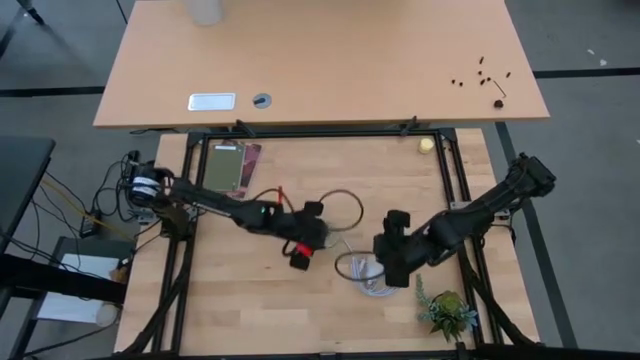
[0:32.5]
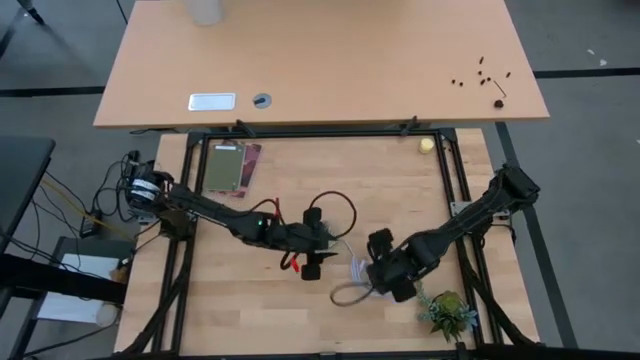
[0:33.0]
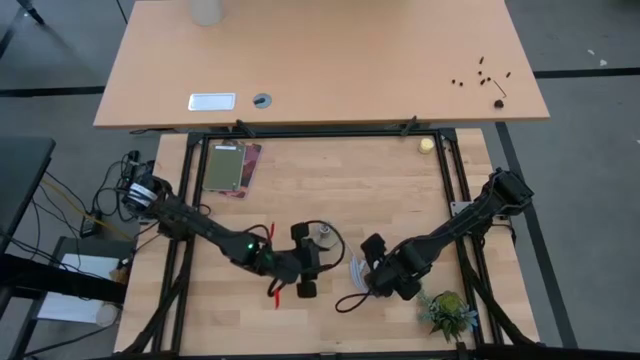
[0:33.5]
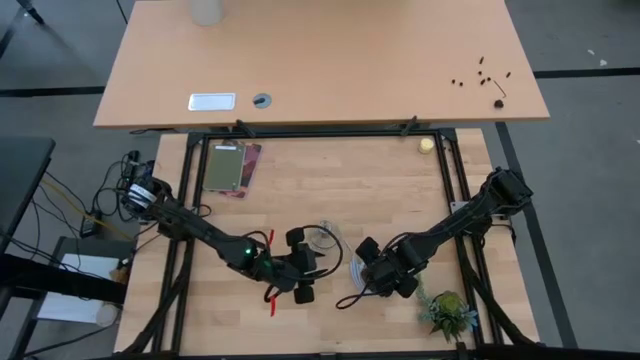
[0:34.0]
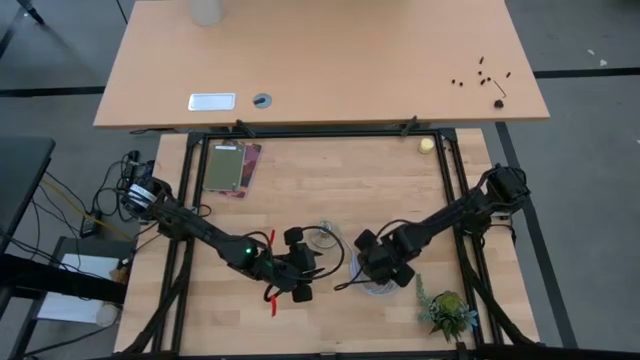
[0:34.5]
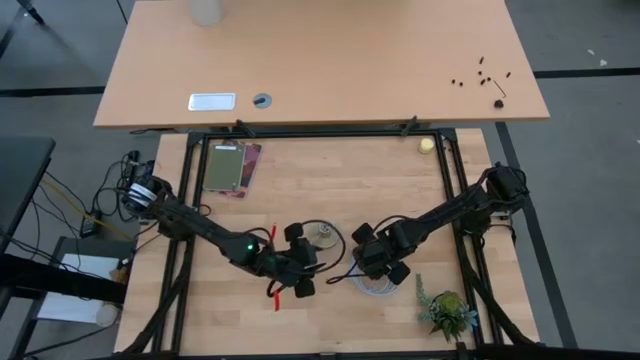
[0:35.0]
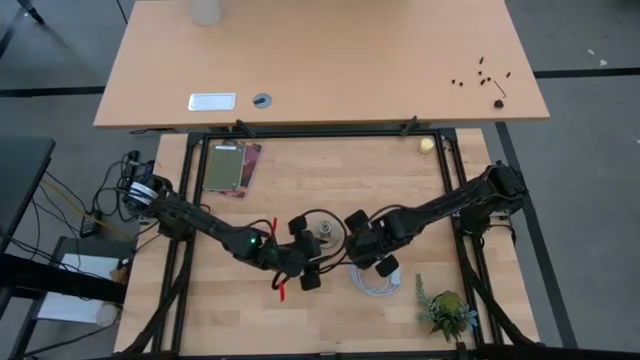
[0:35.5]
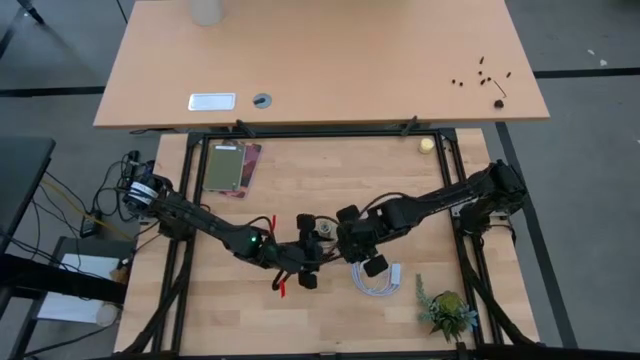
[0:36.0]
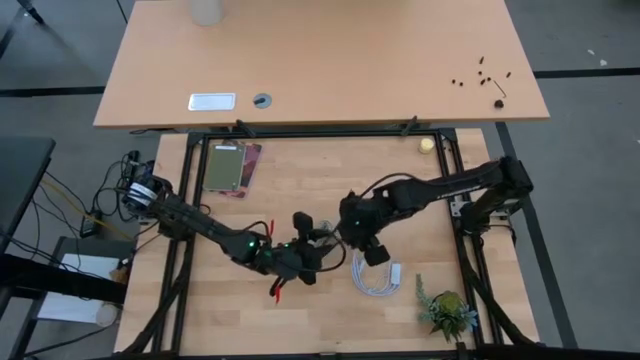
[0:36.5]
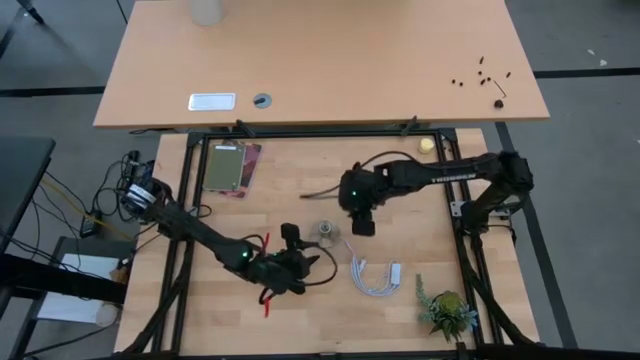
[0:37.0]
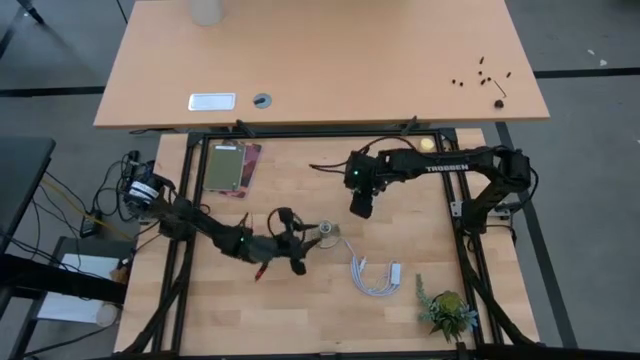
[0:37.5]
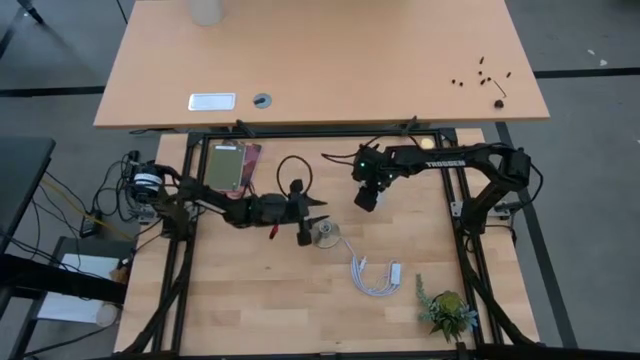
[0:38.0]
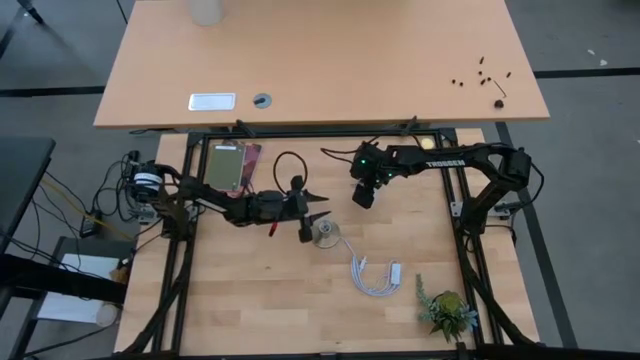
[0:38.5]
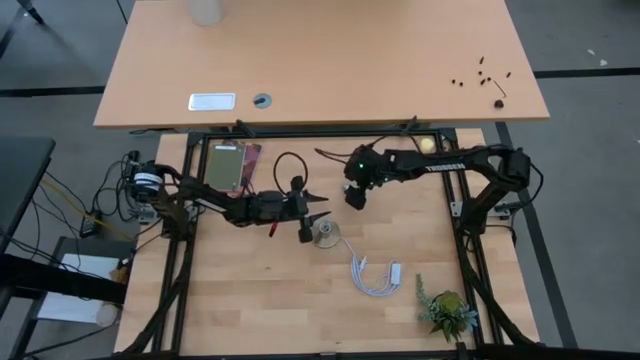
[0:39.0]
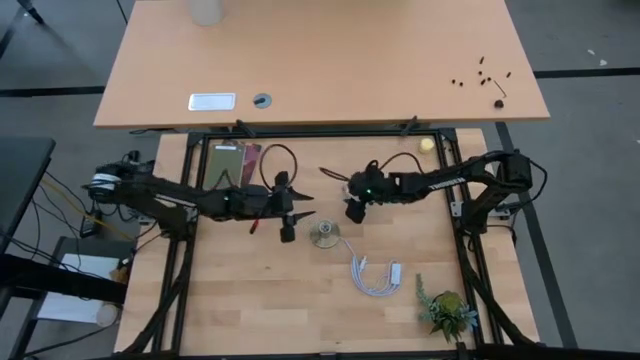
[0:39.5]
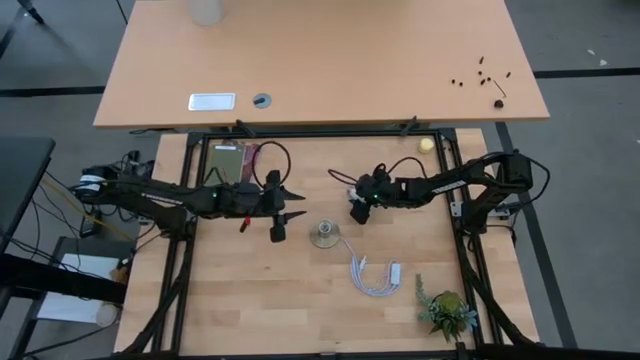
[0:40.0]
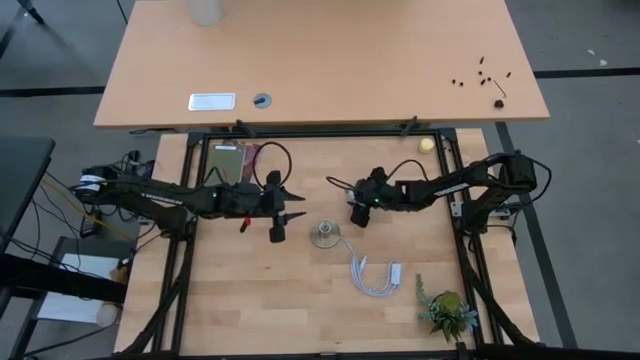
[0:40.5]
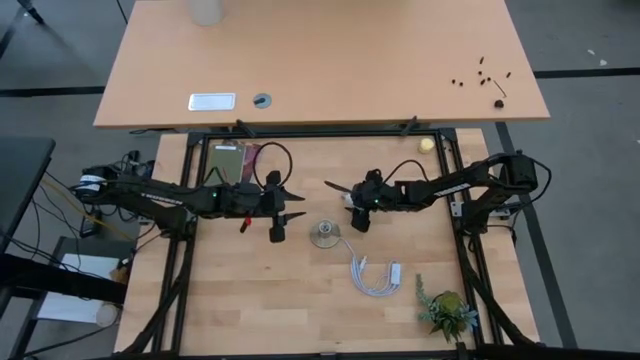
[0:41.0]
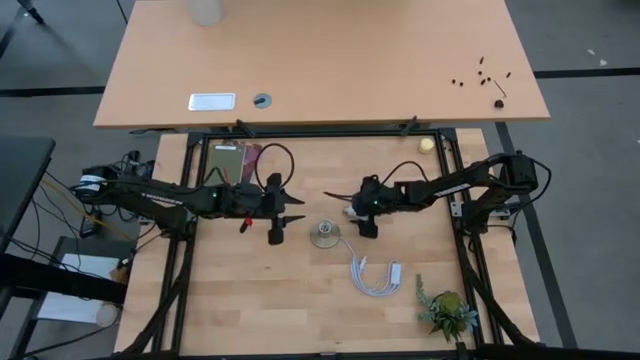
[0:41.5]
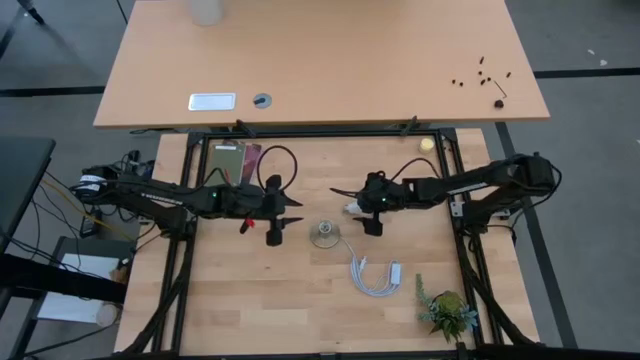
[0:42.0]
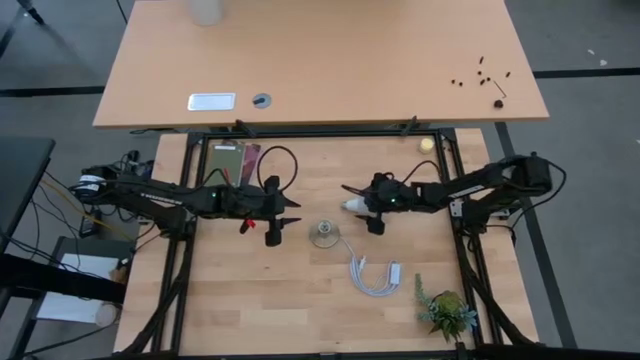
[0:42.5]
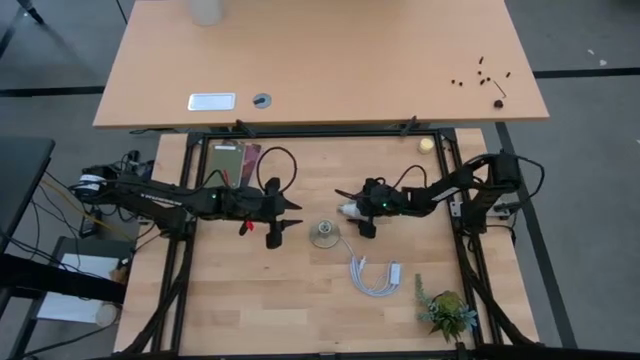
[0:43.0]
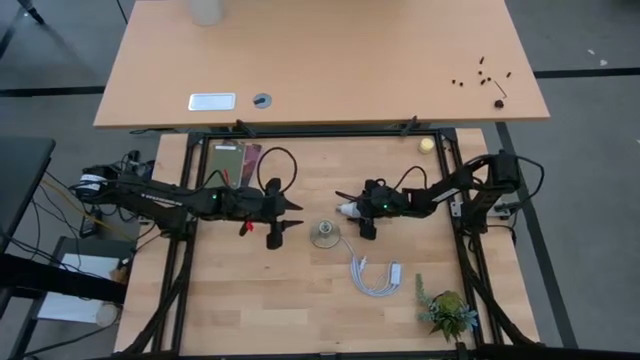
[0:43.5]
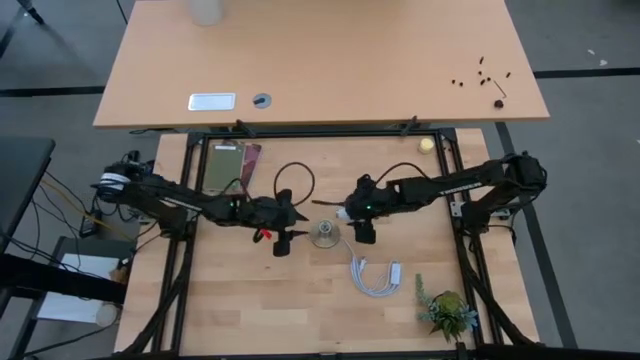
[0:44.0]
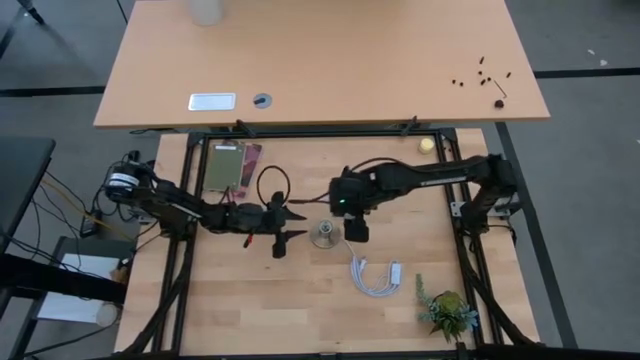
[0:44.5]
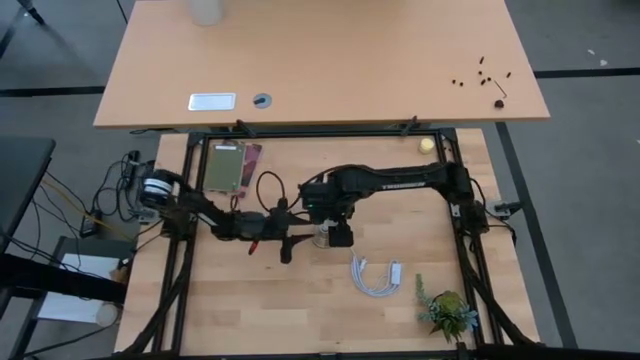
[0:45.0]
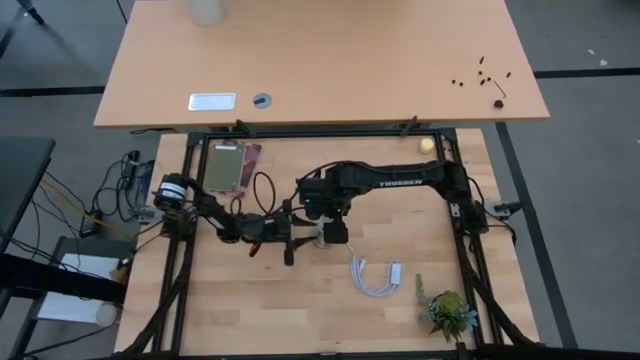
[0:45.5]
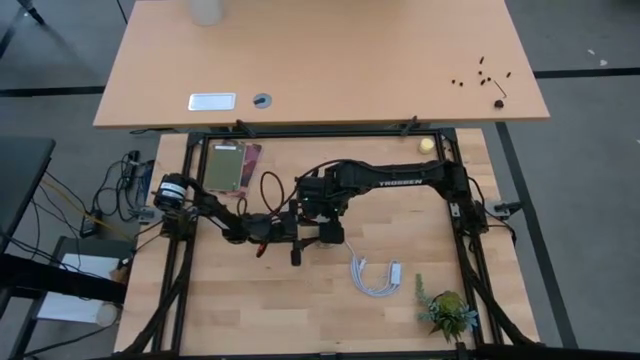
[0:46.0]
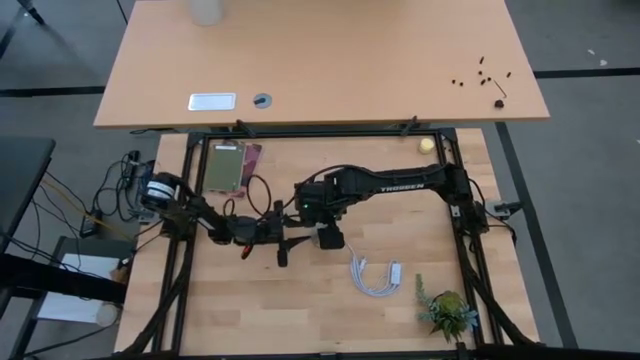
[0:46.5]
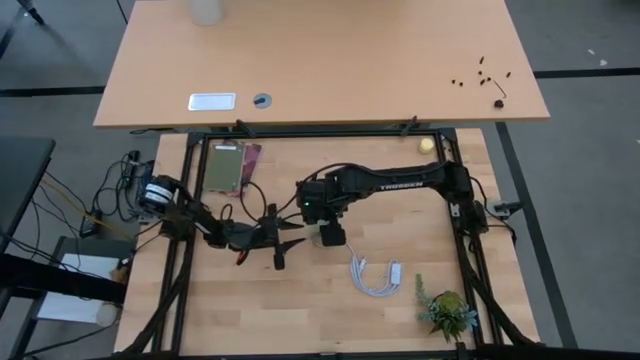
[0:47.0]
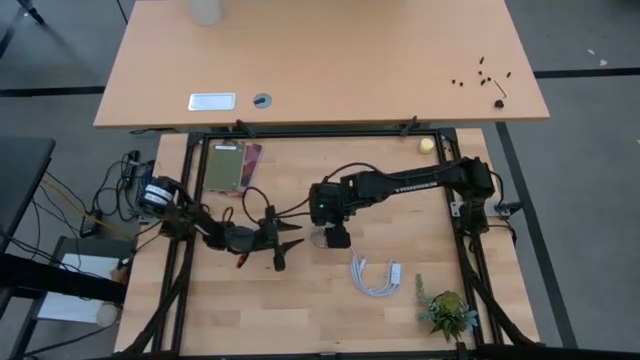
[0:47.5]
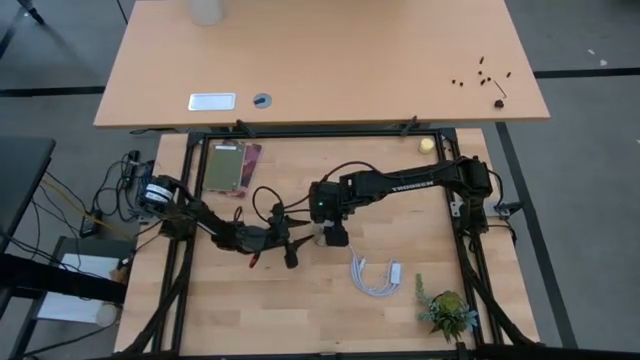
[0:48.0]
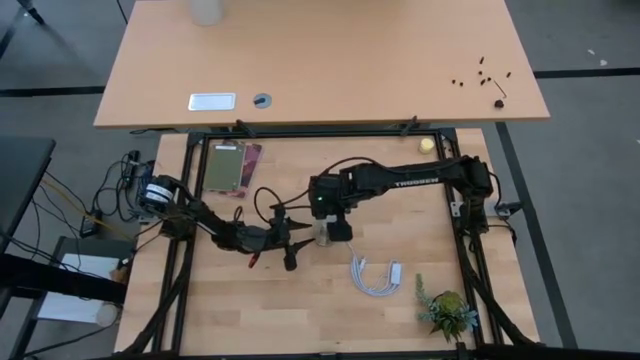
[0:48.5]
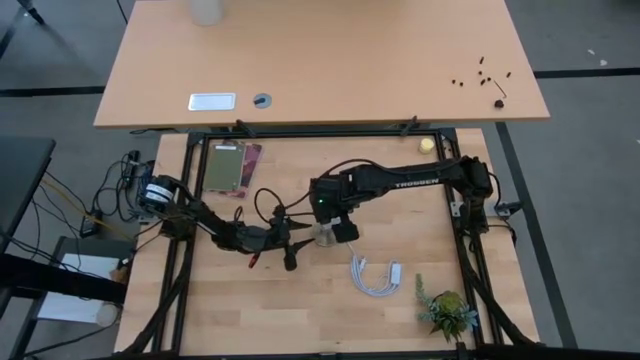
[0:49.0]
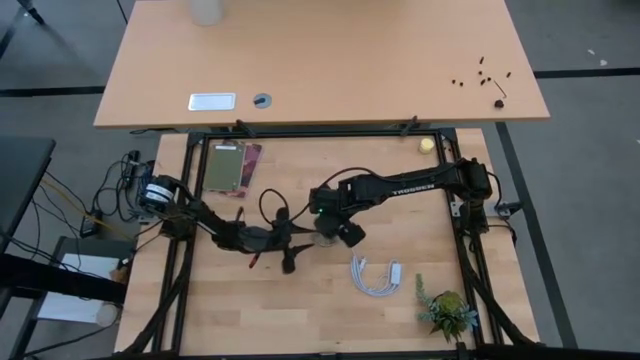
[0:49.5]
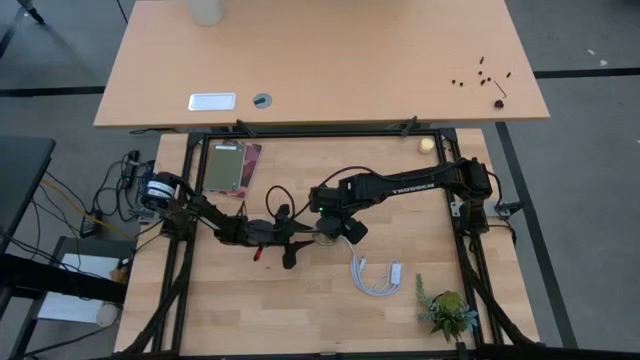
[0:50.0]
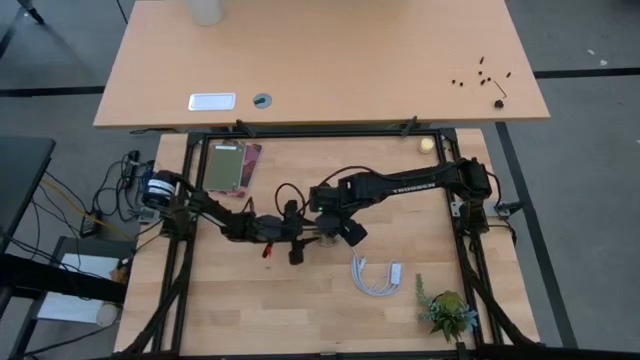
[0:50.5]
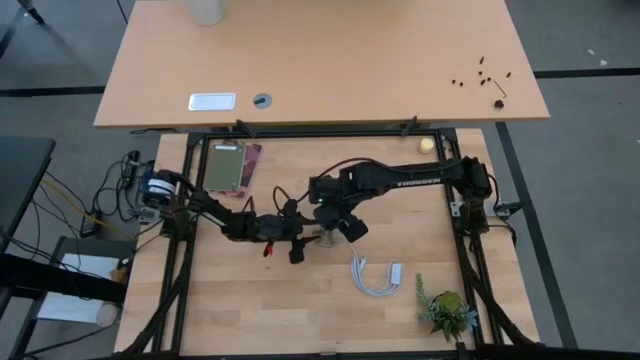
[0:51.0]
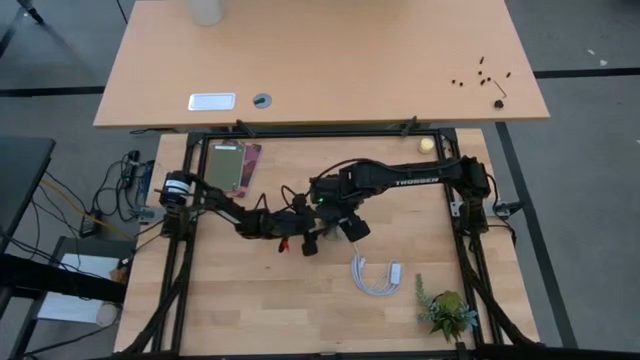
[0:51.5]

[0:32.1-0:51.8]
Task: Screw lightbulb
Insert the white lightbulb into the desk lamp

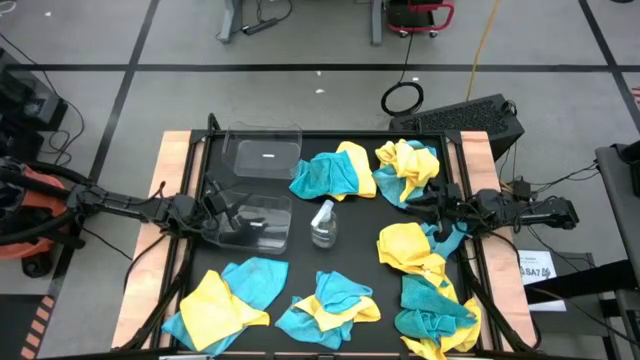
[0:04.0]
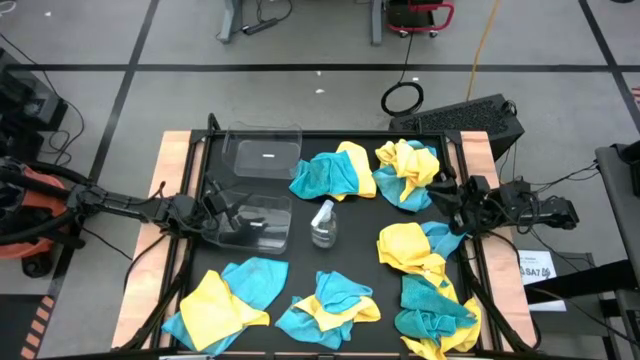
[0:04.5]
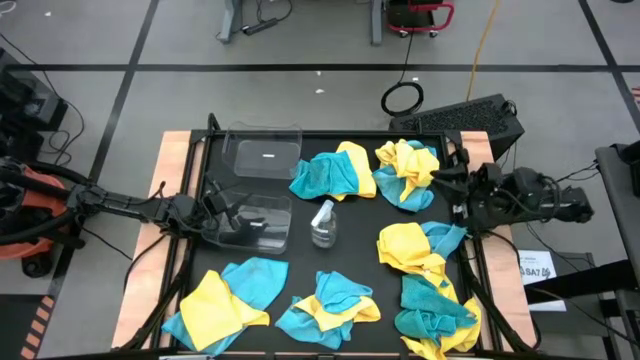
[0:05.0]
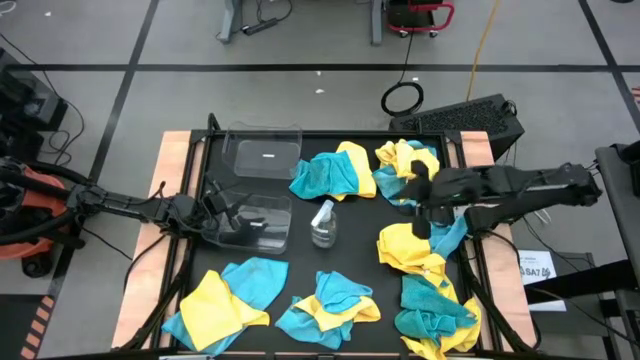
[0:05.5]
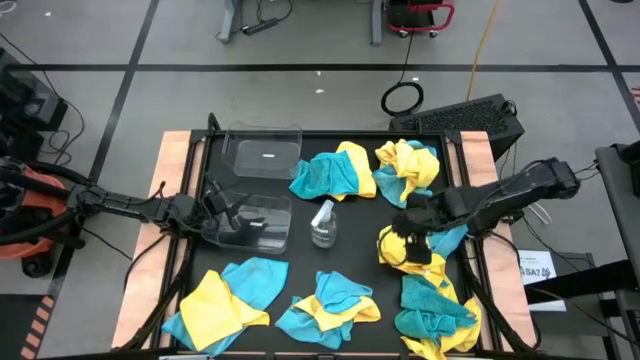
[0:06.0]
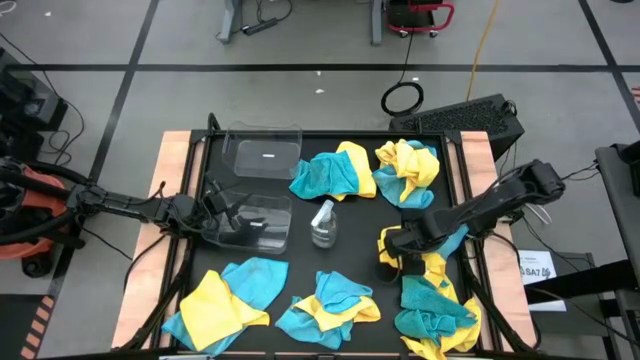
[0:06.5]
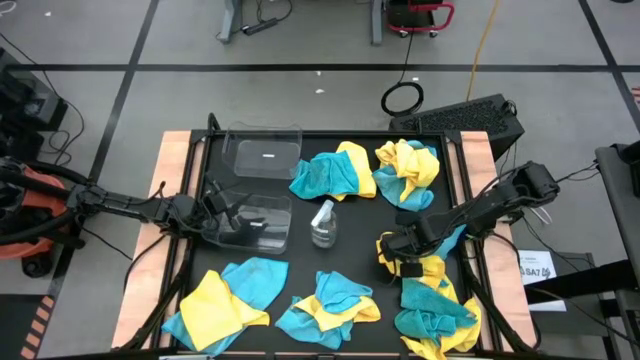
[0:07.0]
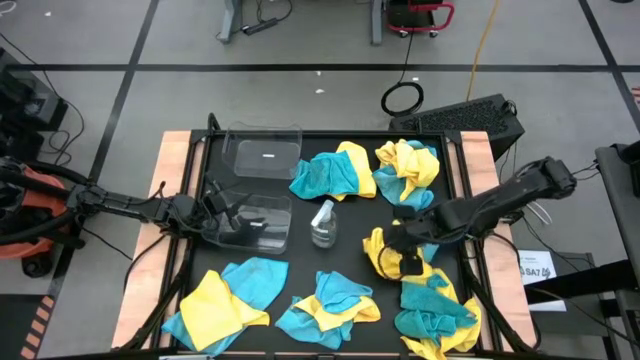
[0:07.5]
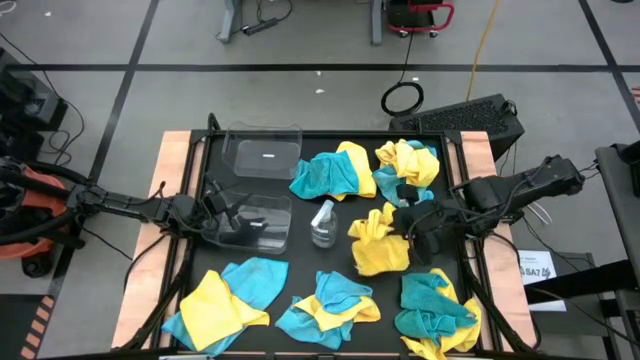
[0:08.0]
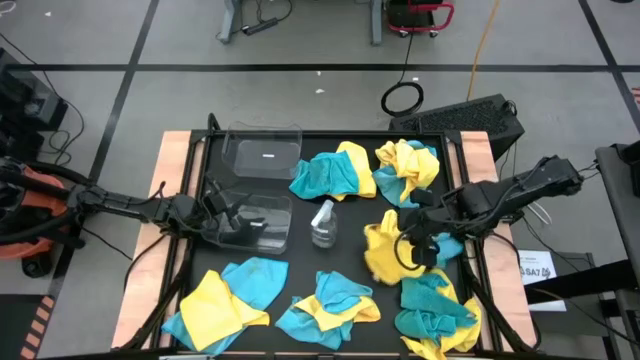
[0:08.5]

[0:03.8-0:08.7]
Task: Sort microfiber towel by color & place in baskets
Put the yellow microfiber cloth into the bottom transparent bin
